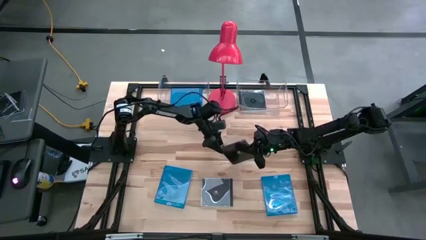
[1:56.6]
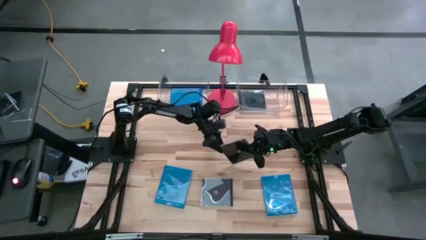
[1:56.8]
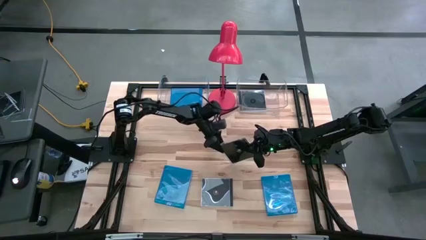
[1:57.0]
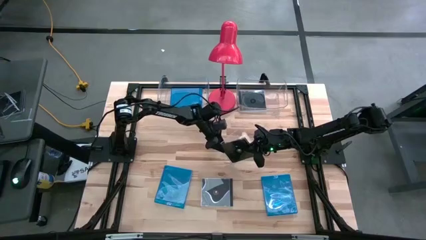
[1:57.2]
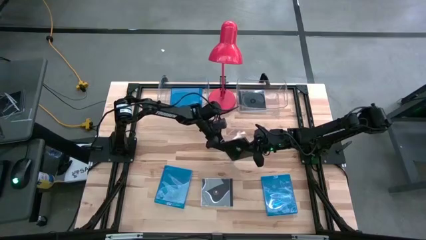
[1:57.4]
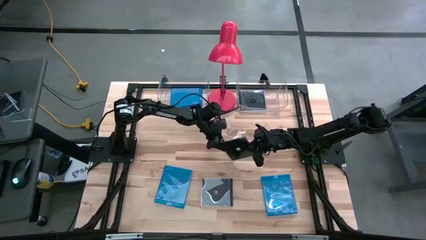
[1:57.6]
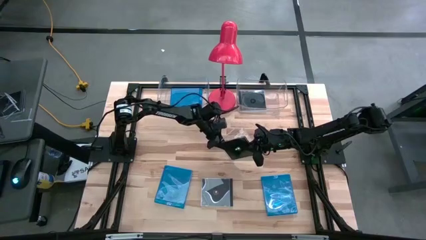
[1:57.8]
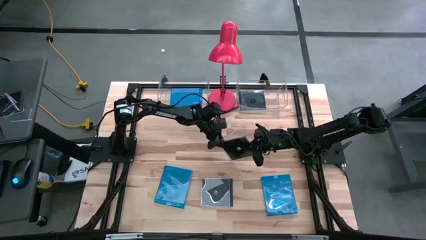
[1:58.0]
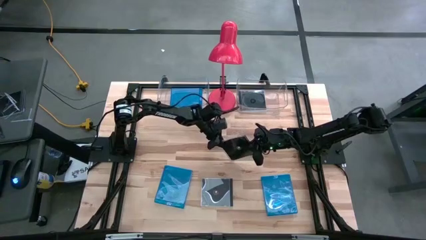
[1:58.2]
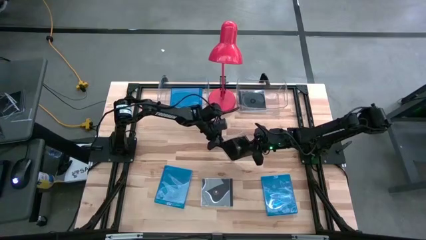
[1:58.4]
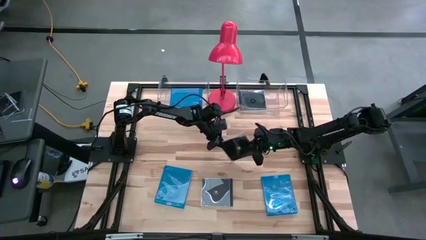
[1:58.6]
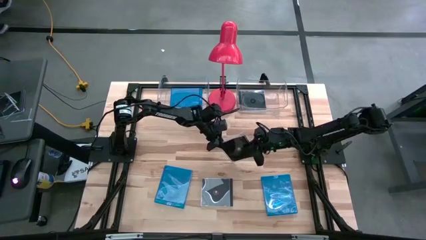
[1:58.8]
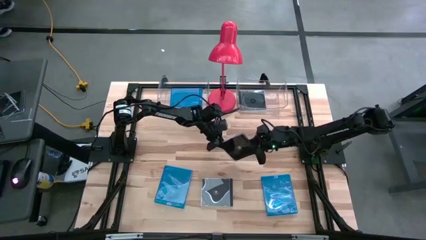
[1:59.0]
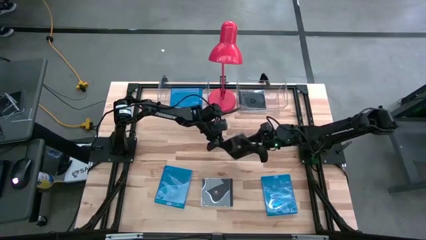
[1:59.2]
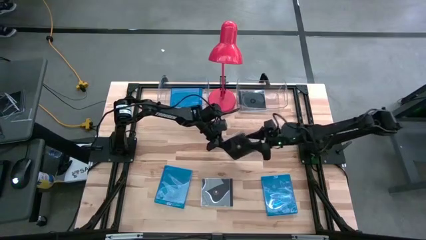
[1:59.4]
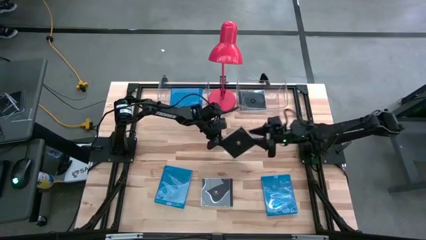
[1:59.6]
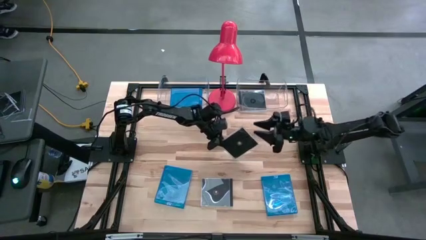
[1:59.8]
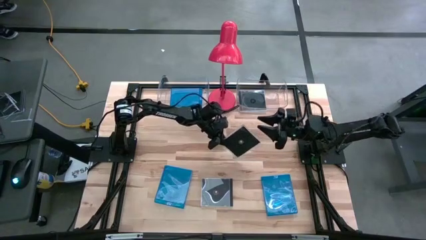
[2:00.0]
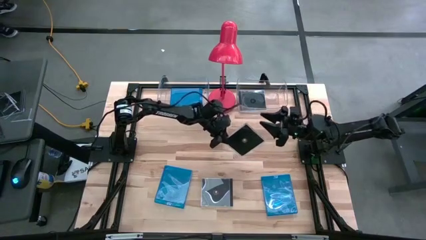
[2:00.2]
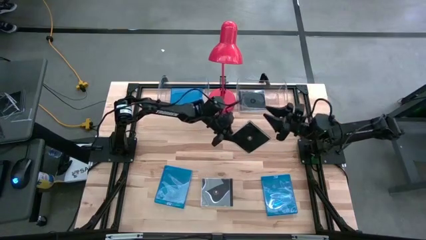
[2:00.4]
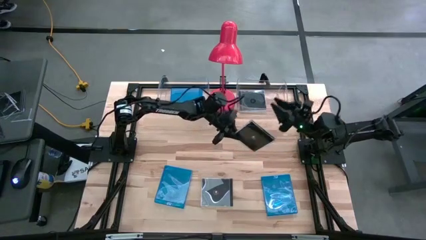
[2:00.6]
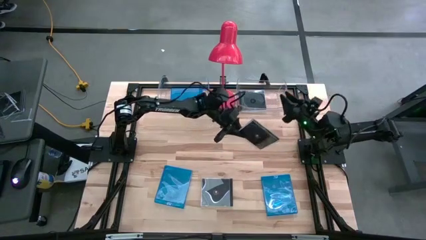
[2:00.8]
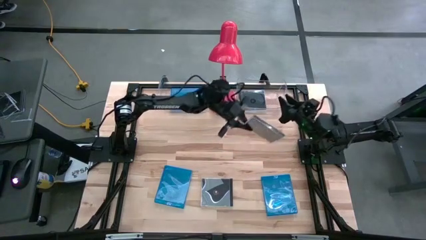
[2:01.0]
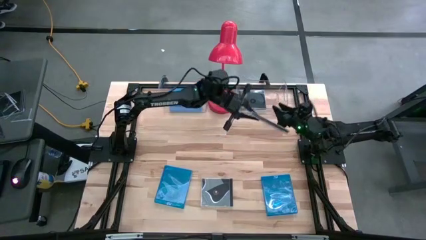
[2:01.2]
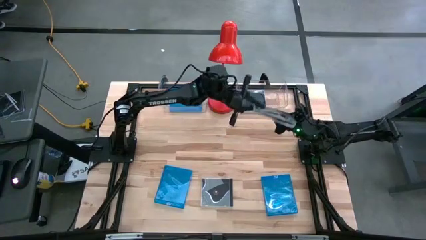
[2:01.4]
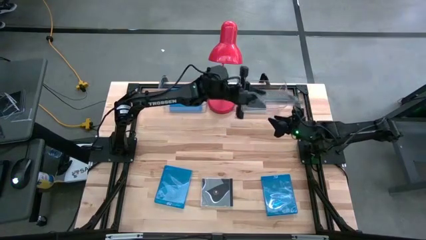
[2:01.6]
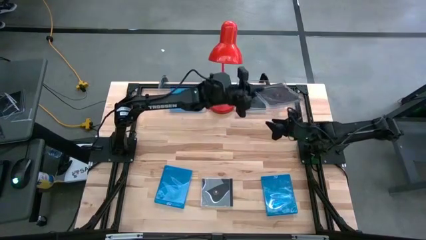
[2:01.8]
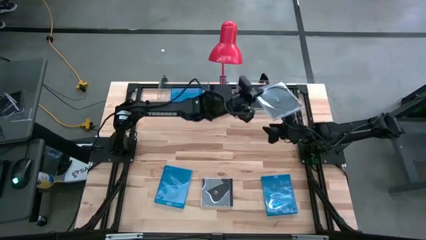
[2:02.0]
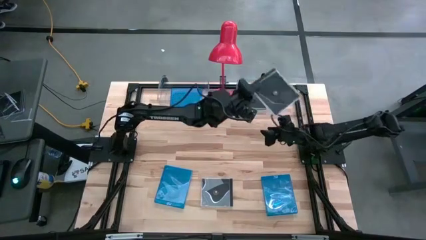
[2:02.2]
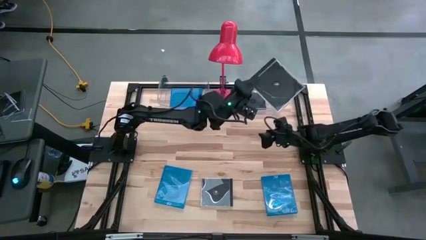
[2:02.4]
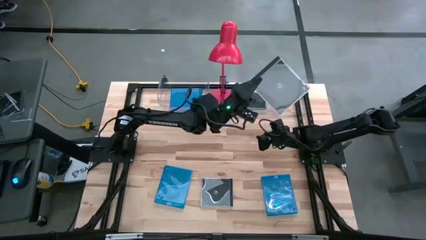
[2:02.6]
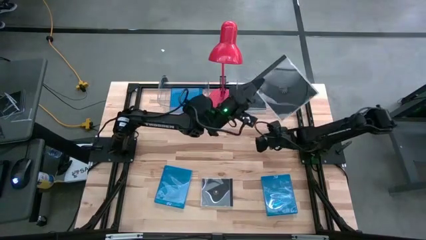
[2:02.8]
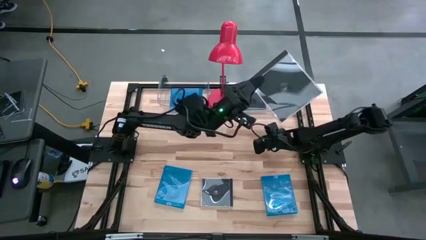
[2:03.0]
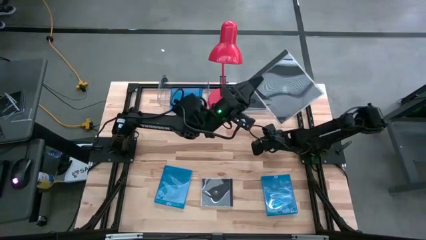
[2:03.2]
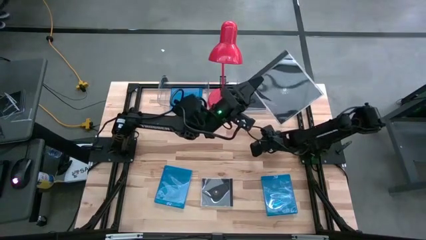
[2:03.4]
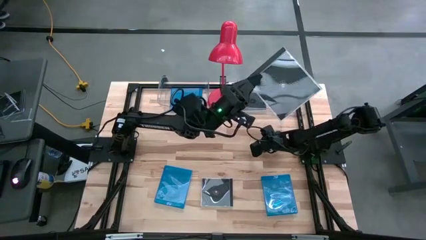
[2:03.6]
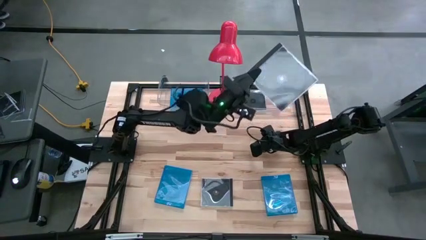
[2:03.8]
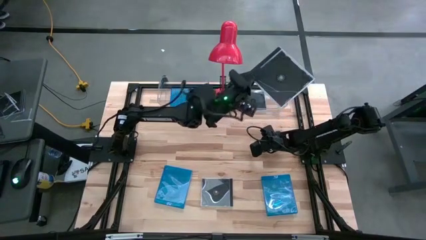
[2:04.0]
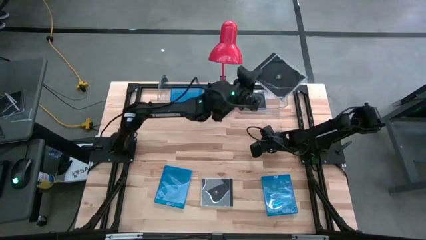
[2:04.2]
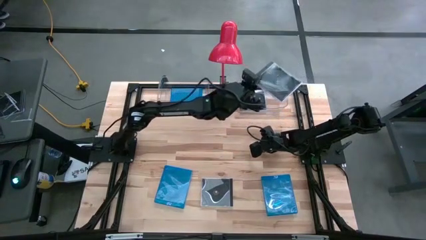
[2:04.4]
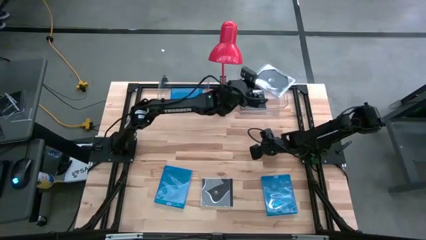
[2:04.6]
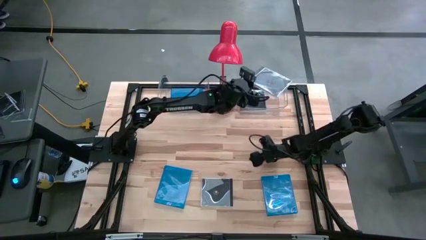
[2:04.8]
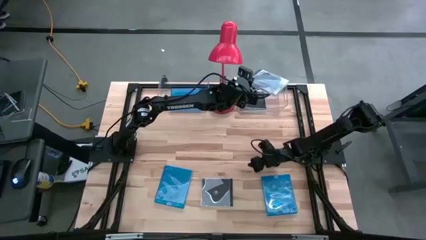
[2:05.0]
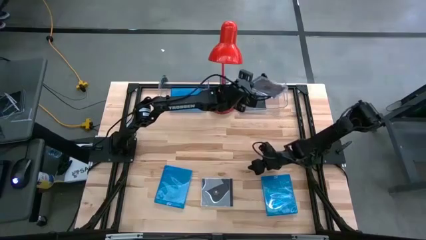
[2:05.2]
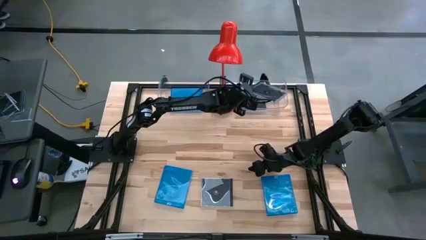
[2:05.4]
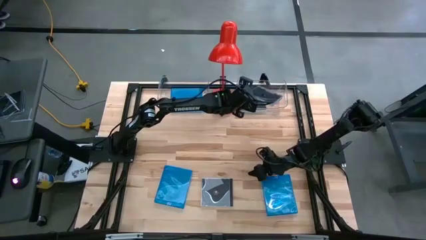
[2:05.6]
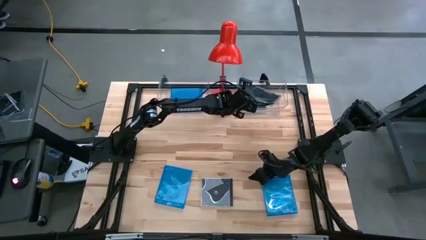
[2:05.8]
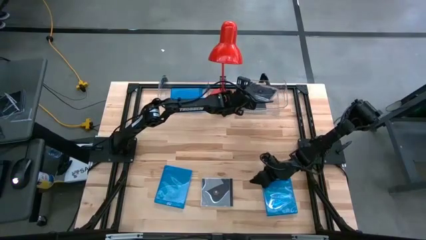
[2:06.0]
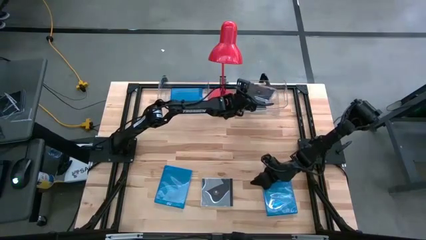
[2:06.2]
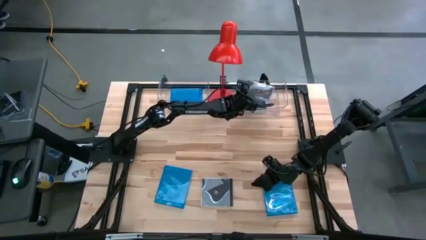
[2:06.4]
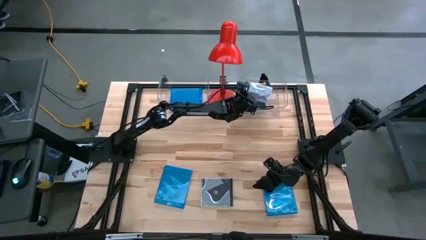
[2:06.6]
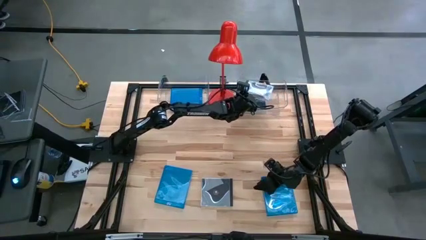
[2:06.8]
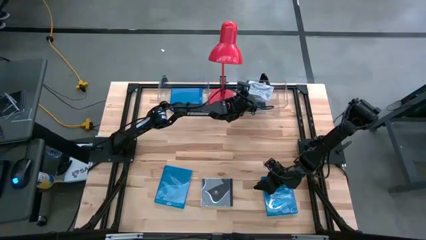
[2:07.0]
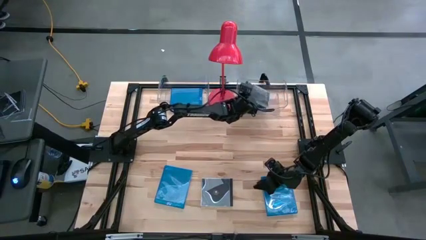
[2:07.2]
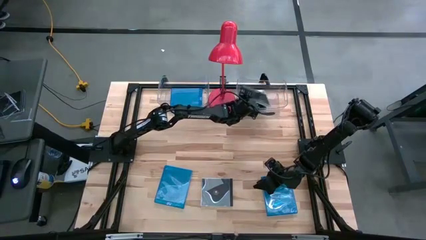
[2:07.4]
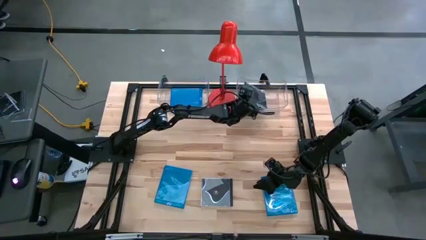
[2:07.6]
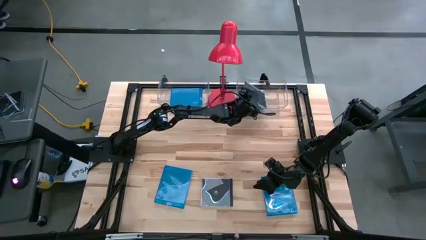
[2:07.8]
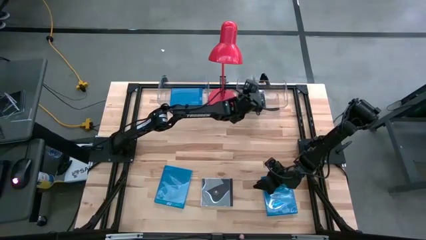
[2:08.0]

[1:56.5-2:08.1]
Task: Pick & place jewel cases by type
Put the right black cd case into the right transparent bin

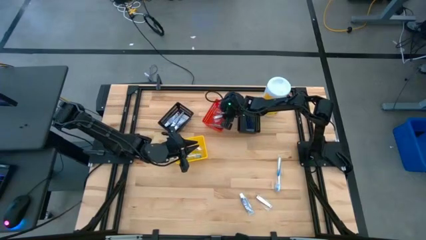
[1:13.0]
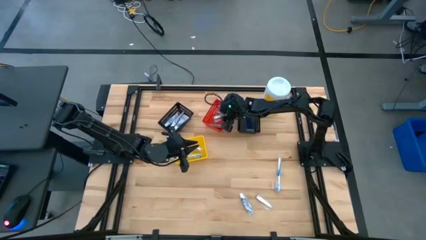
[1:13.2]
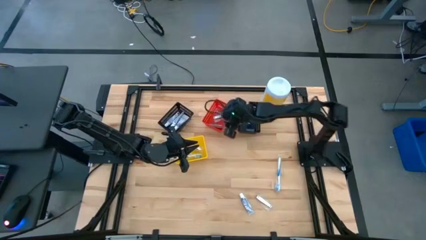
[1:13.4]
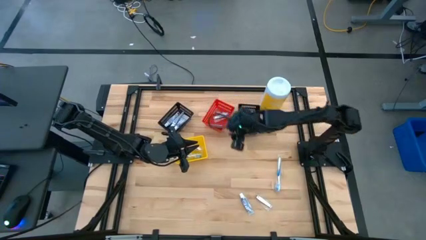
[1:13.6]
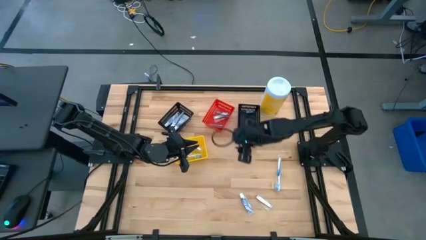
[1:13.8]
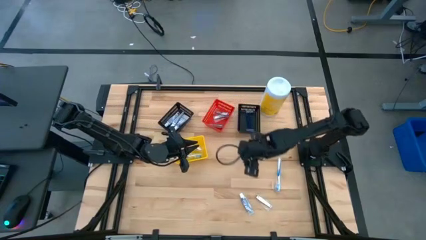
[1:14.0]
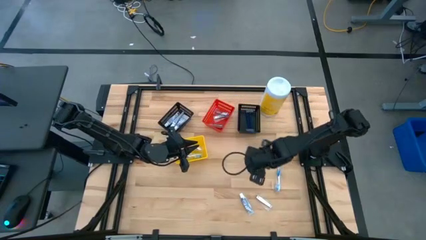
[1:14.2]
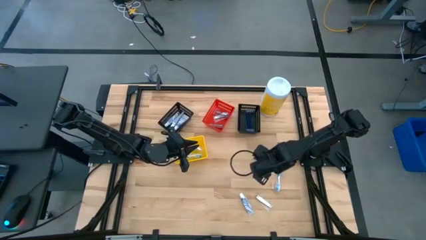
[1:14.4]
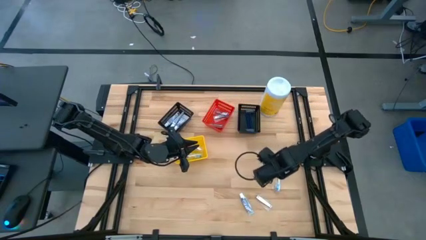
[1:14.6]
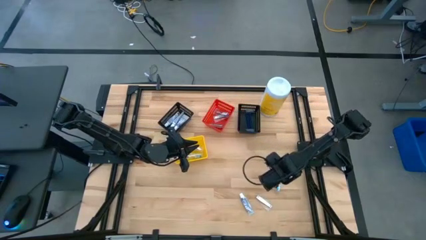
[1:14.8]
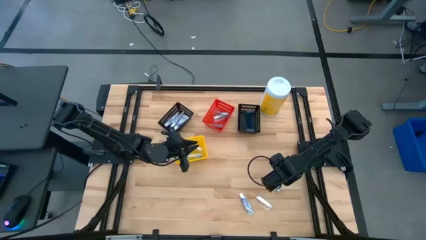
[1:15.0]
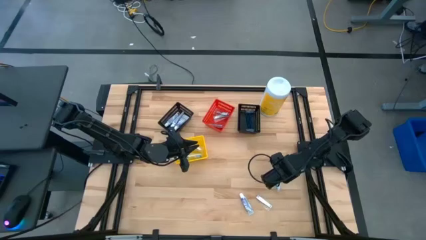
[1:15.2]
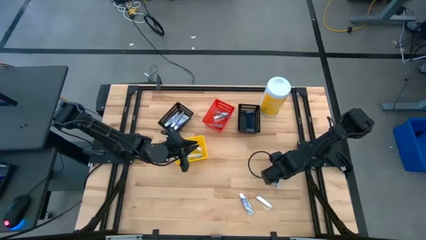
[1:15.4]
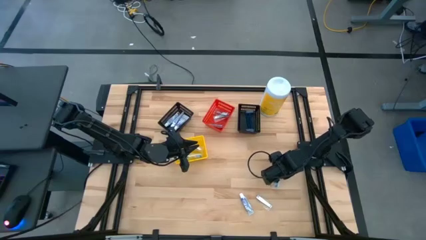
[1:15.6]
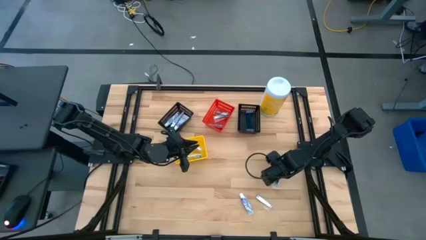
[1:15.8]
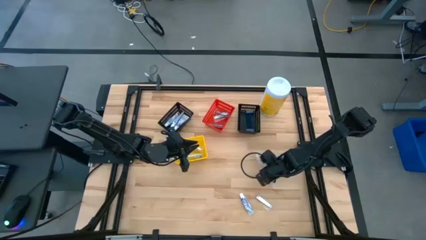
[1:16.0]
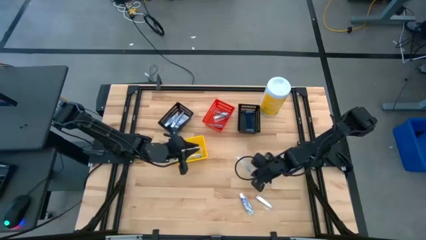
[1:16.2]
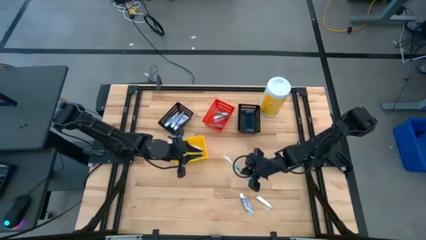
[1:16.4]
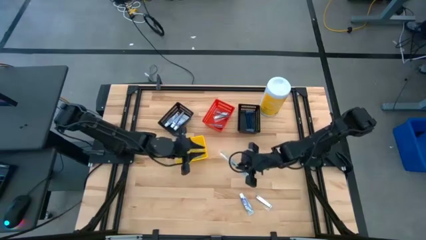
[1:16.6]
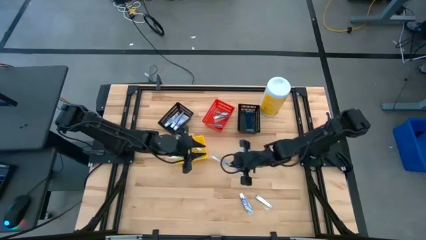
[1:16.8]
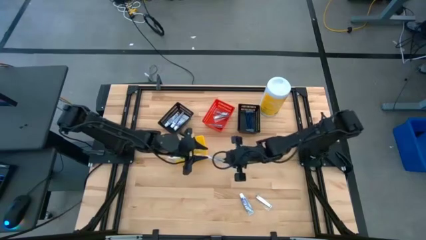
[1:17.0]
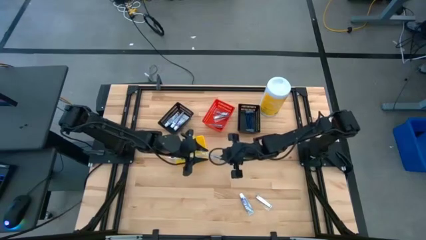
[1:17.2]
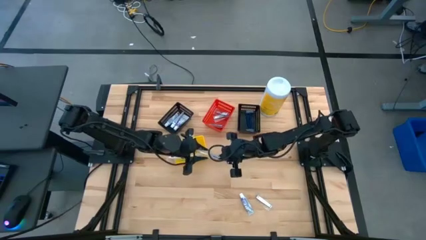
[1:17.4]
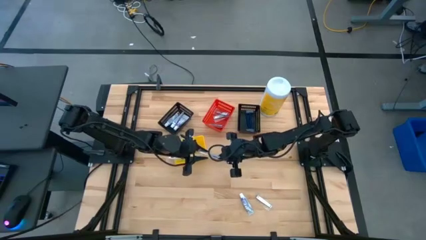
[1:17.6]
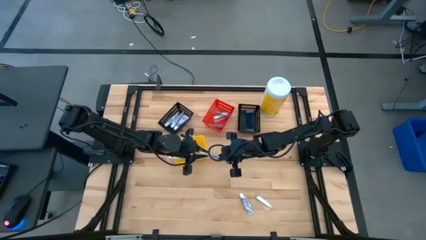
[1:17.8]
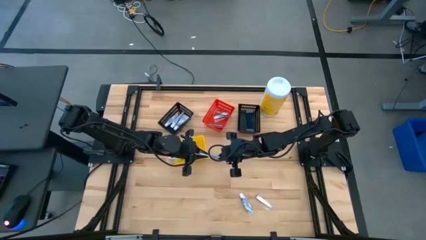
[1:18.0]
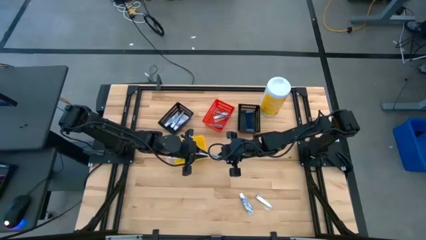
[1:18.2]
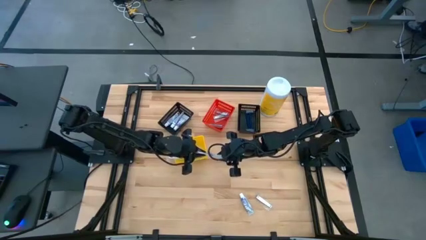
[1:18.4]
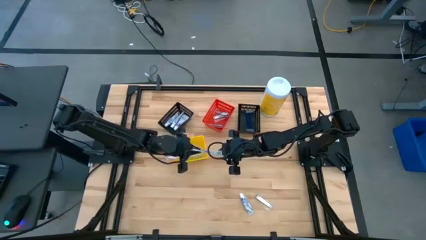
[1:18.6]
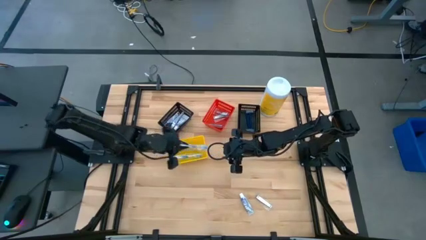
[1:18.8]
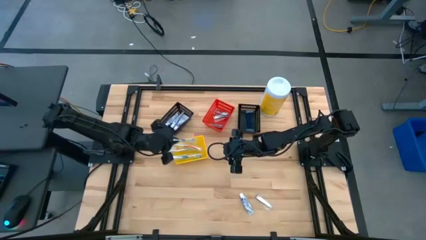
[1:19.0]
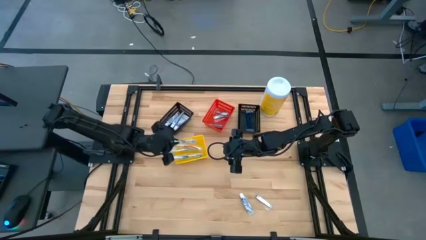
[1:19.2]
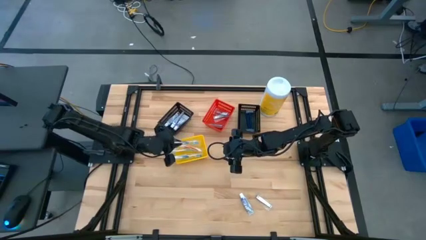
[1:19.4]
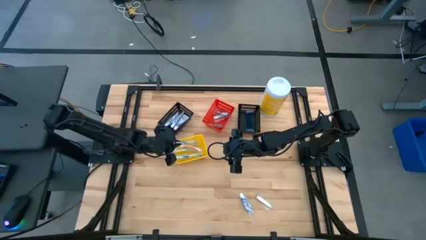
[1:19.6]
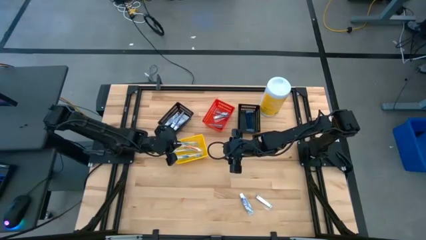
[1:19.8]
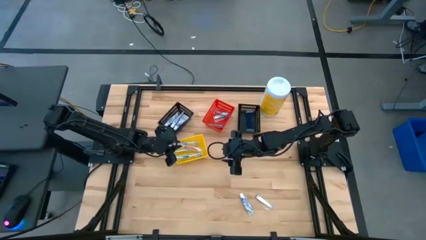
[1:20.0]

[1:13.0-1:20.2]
Task: Pick & Place Travel size toiletries
Put the blue toothbrush into the yellow bin
